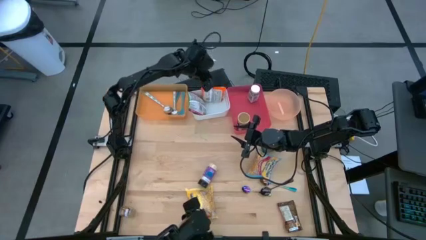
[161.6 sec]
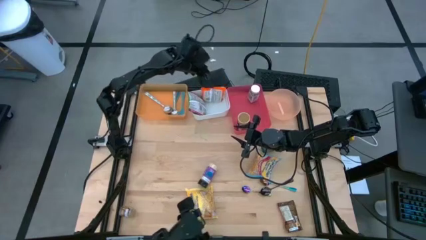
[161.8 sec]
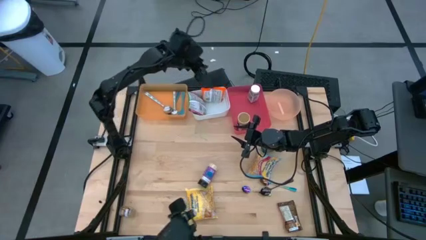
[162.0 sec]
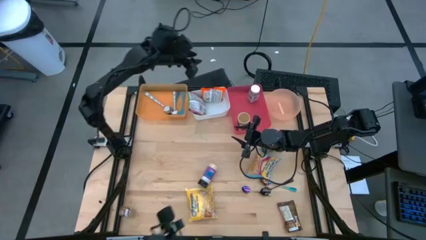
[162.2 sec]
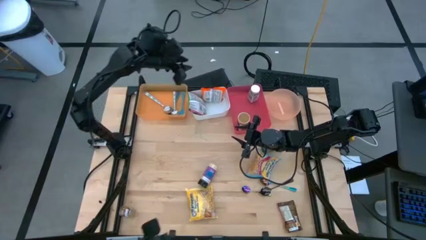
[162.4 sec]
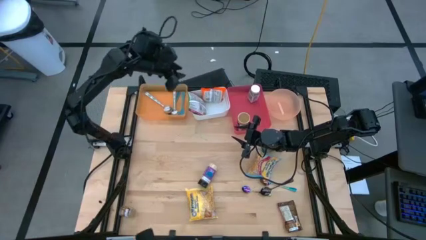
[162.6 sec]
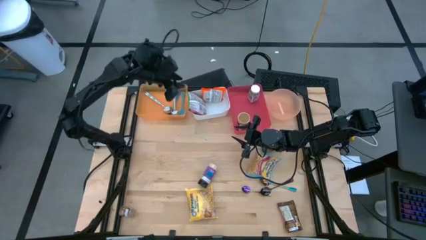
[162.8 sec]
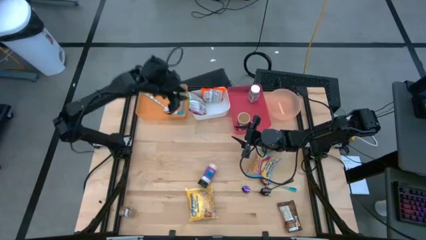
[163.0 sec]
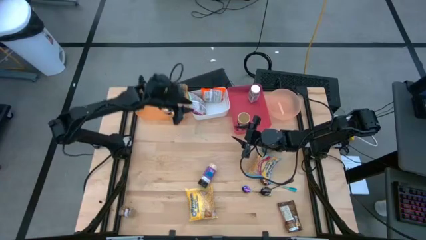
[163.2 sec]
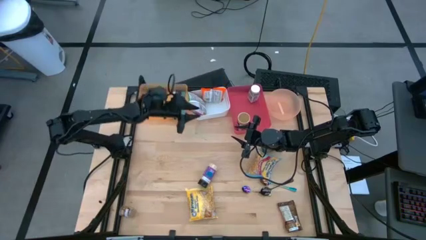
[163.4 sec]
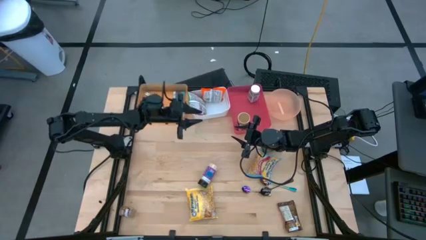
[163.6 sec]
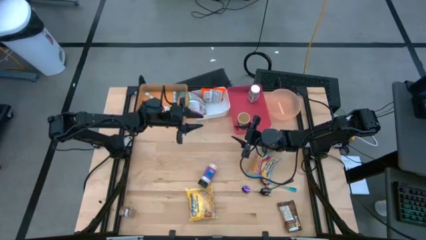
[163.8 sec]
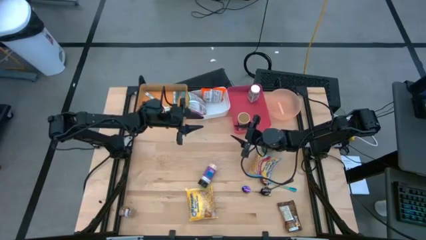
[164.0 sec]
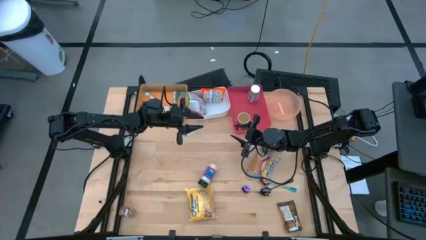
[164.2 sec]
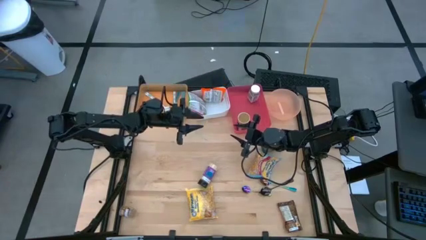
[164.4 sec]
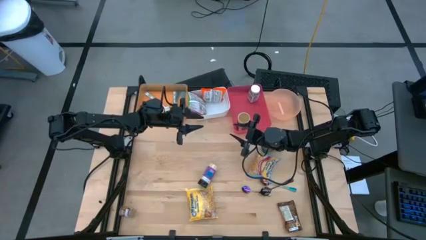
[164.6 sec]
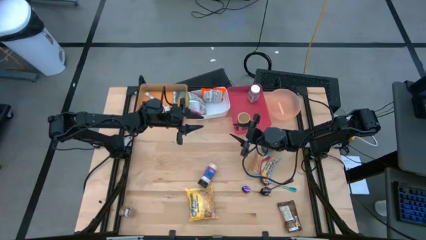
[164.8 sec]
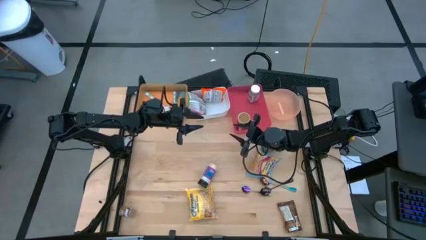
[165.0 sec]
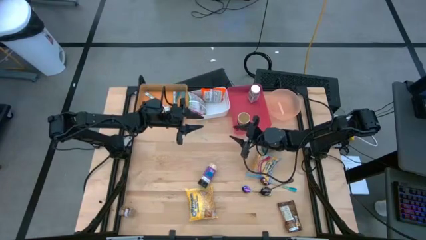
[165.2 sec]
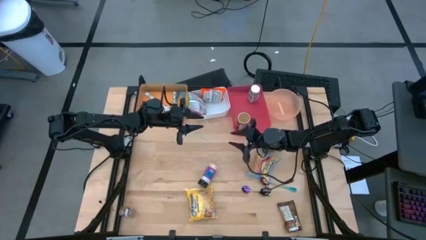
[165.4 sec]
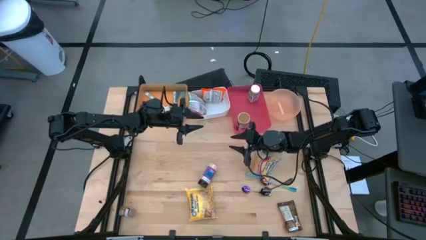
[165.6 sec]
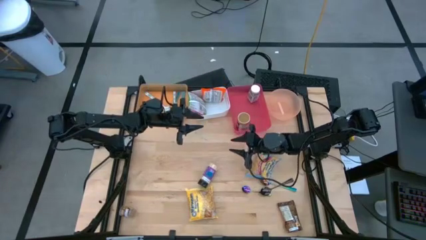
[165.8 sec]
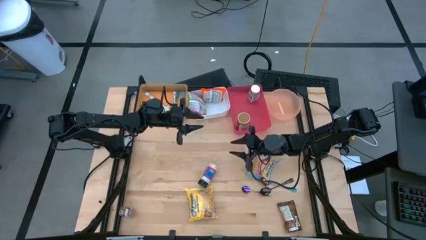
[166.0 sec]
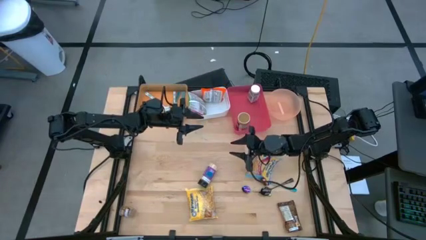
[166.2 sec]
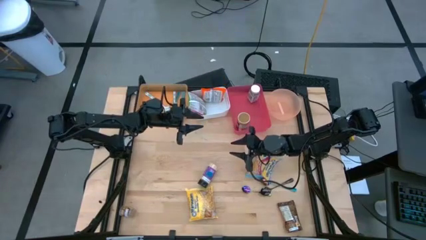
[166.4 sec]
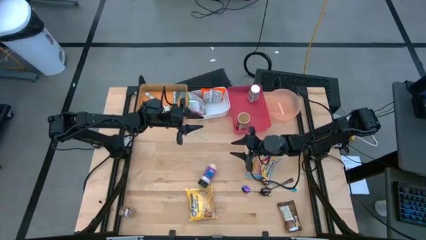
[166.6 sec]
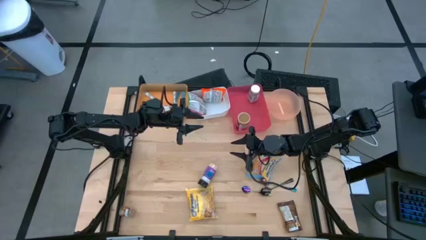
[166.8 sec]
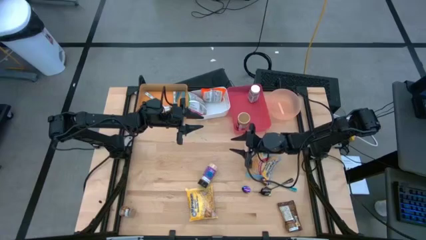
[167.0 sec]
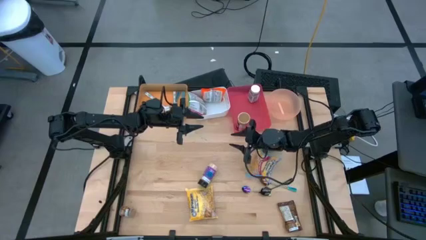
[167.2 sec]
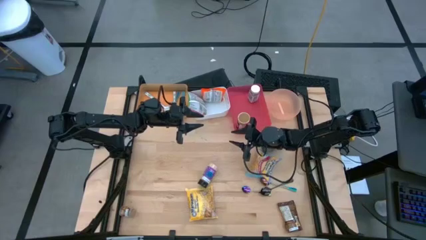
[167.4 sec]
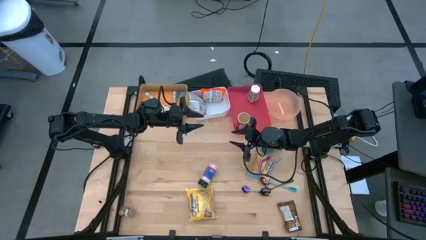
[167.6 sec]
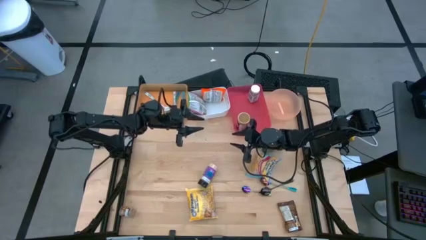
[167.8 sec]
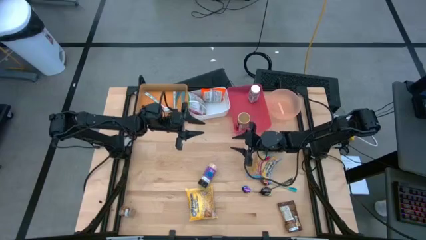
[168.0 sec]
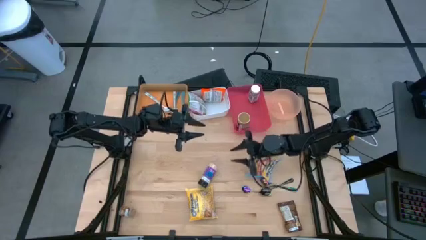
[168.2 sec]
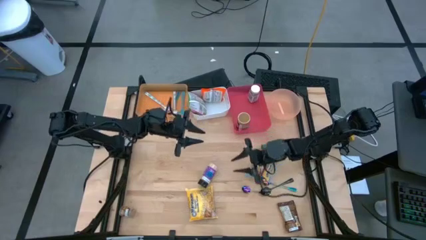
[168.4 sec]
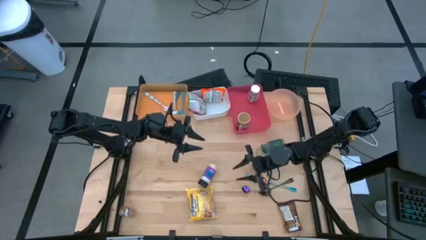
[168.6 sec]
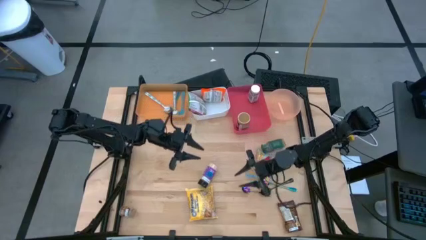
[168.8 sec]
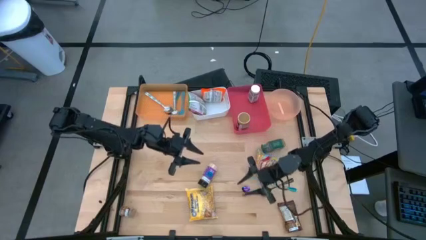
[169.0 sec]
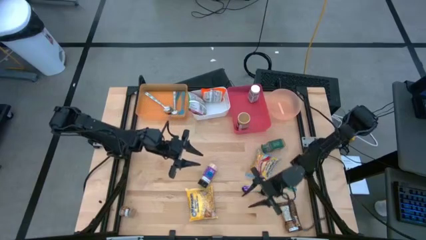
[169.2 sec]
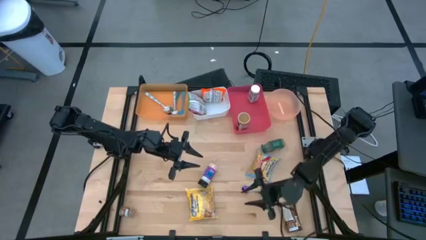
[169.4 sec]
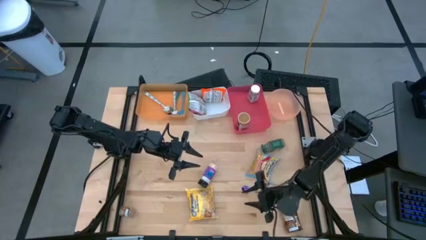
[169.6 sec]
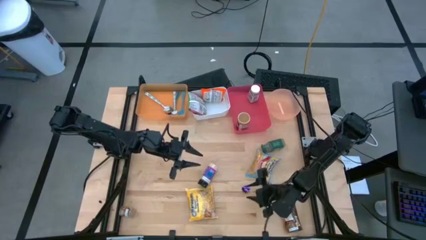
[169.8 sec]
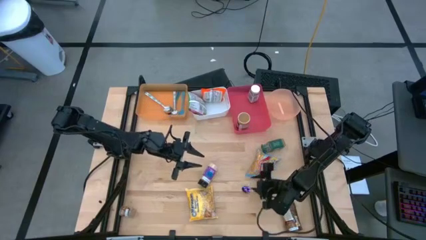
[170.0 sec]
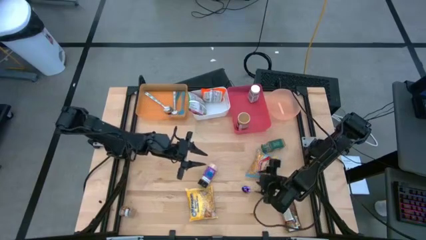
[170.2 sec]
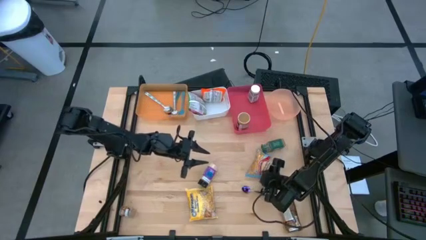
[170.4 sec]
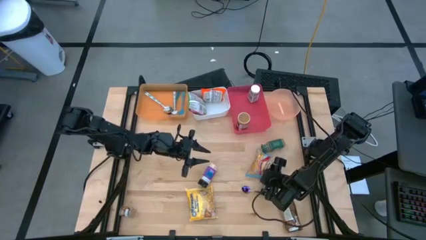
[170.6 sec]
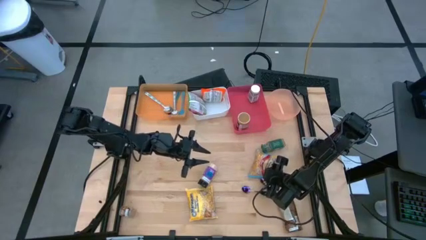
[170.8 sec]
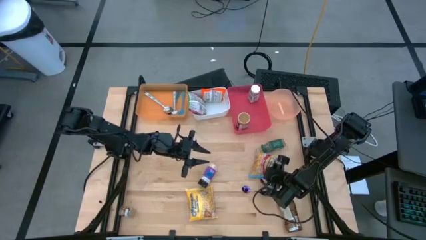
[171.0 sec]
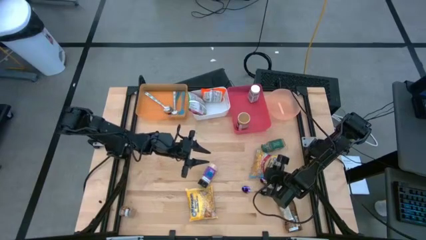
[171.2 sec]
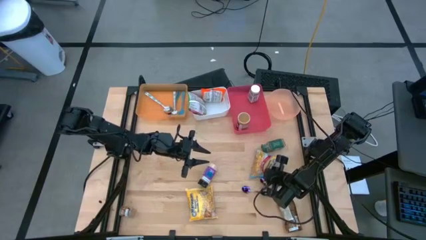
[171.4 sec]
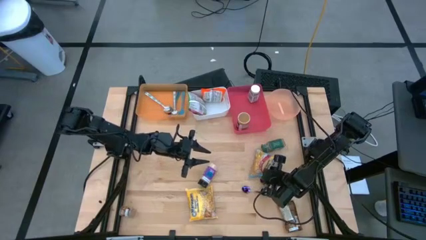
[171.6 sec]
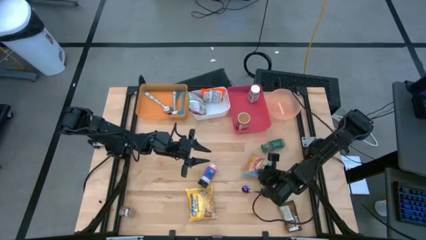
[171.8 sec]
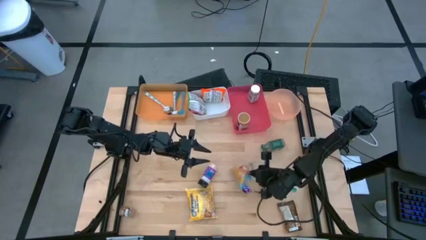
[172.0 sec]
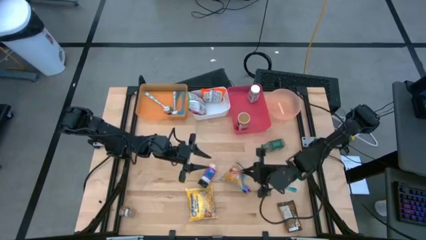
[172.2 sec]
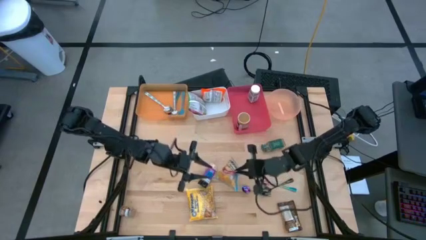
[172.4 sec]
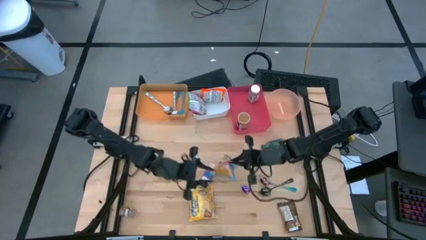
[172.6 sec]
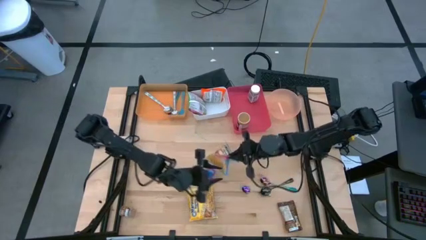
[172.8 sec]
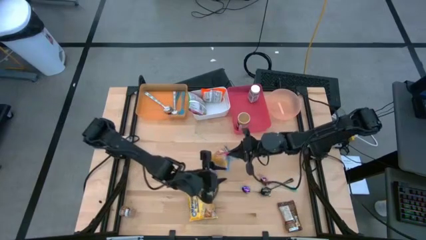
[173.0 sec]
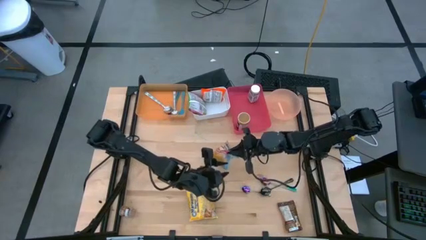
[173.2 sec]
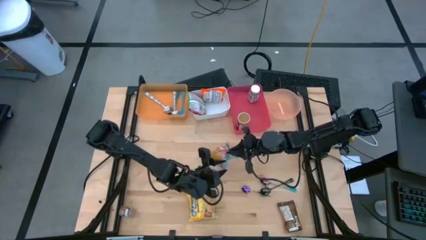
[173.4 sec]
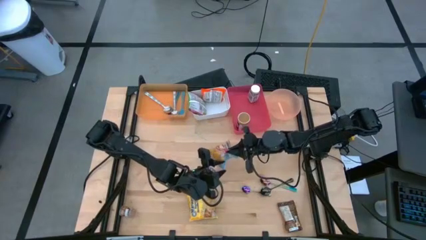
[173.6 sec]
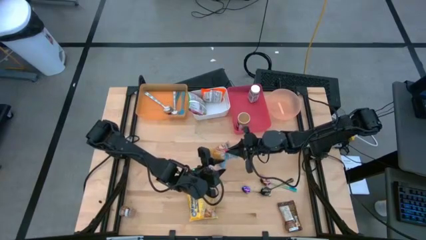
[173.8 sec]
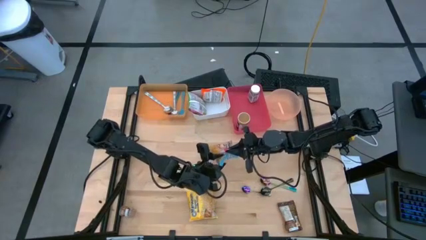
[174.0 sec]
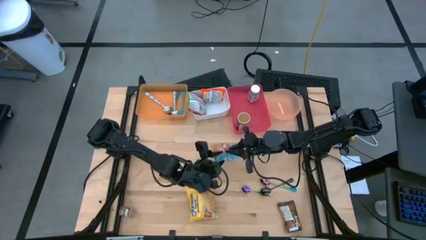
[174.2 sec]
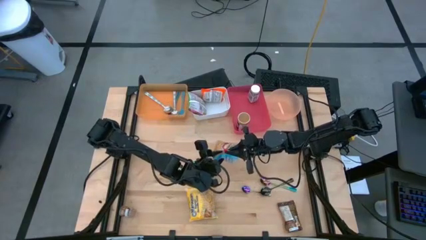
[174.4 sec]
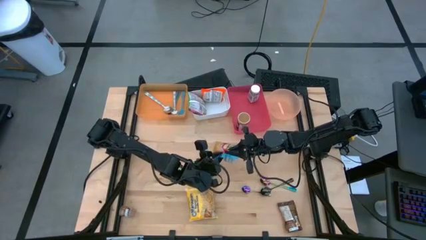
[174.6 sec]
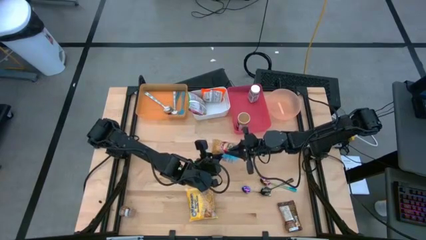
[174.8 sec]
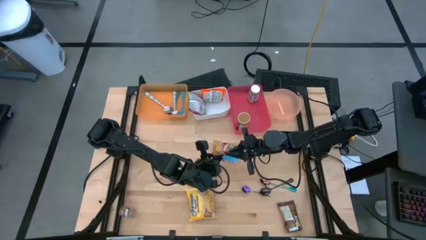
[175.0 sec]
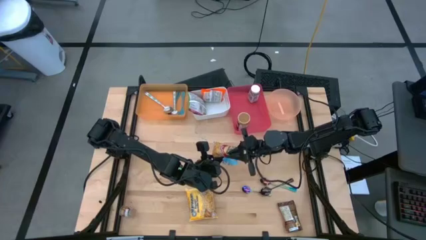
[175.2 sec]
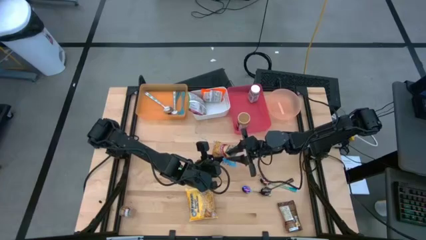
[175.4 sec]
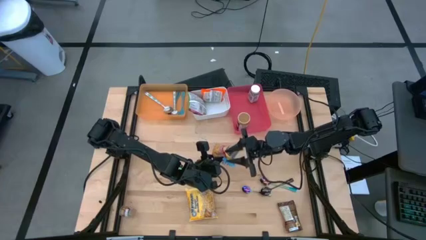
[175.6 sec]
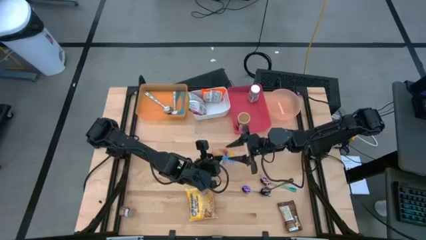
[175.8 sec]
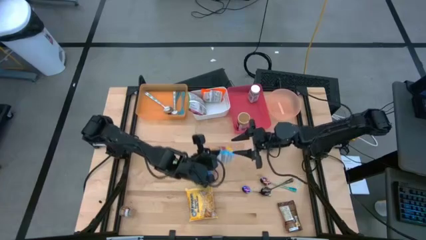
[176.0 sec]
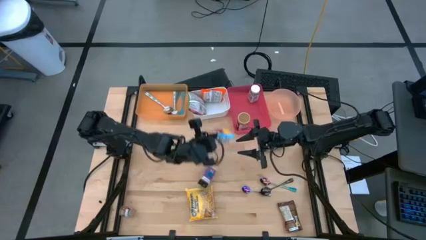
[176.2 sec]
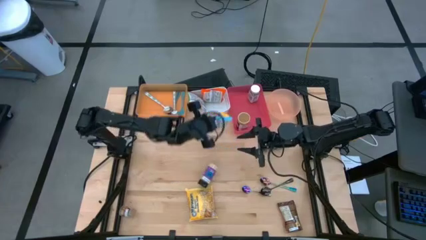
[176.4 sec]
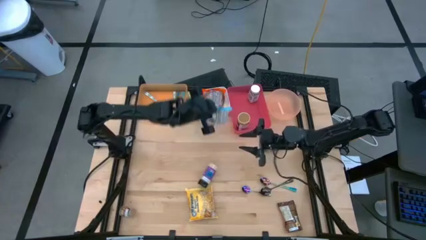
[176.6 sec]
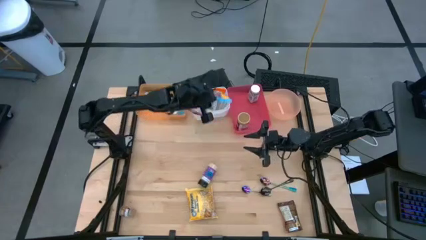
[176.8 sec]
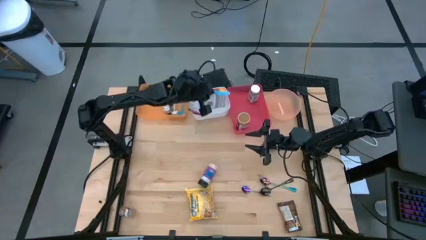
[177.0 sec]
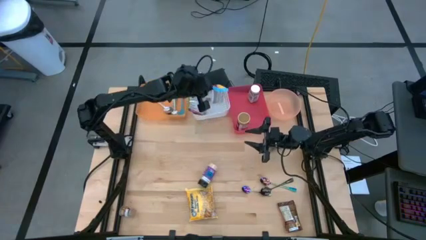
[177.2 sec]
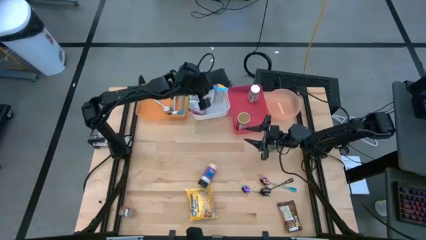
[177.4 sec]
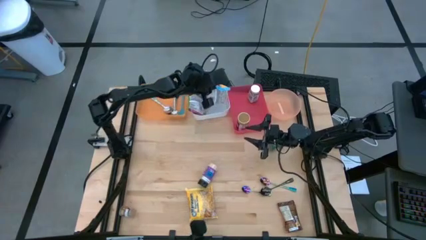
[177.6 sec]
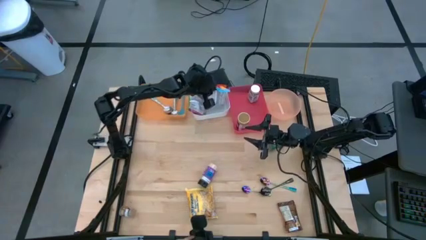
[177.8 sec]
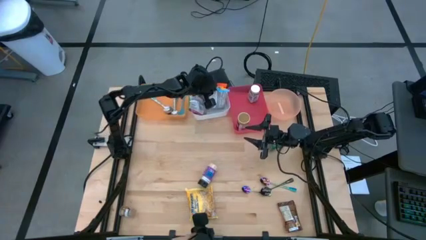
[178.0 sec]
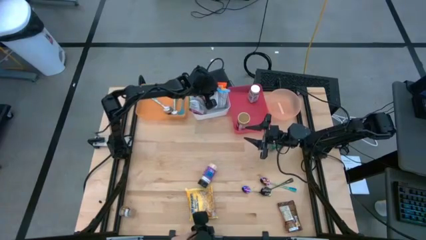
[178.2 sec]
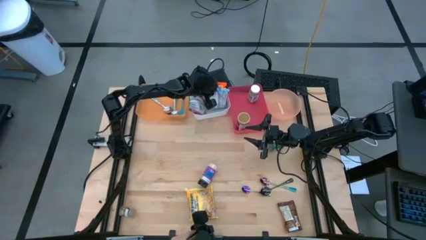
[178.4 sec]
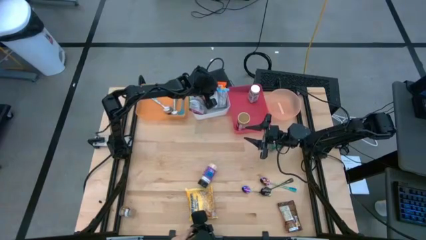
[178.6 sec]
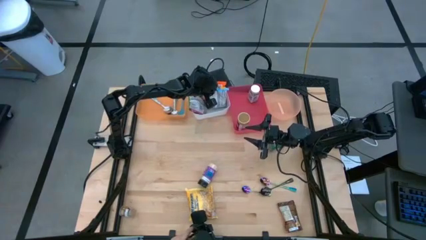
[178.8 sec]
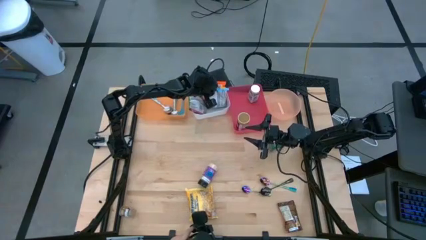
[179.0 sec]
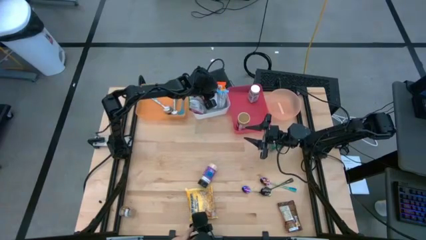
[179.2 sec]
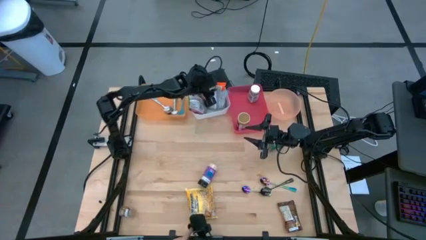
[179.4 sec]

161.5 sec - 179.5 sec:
Task: Pick & Place Food Item
Put the blue noodle pack into the white bin
